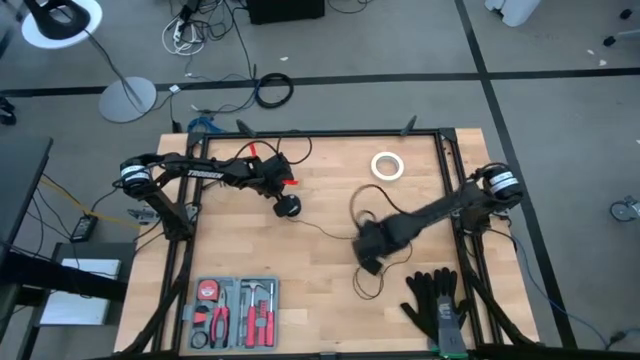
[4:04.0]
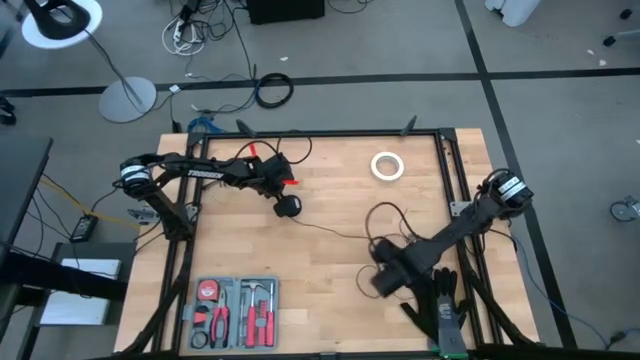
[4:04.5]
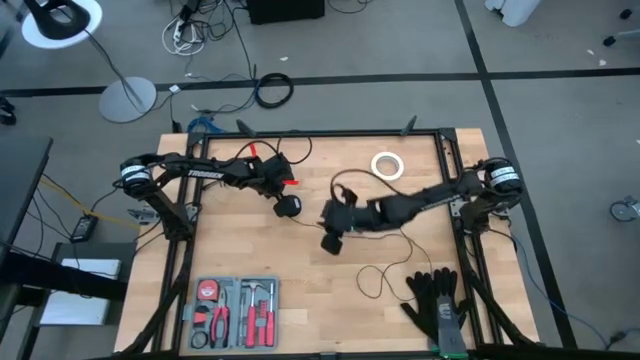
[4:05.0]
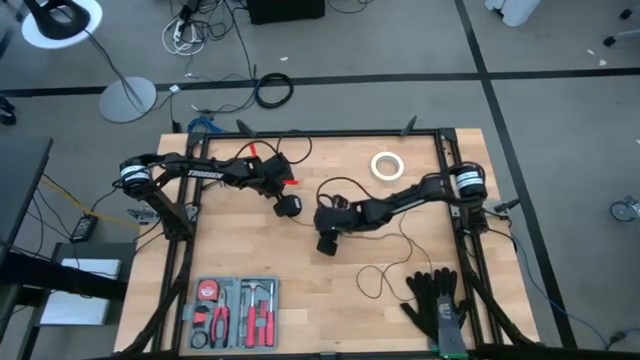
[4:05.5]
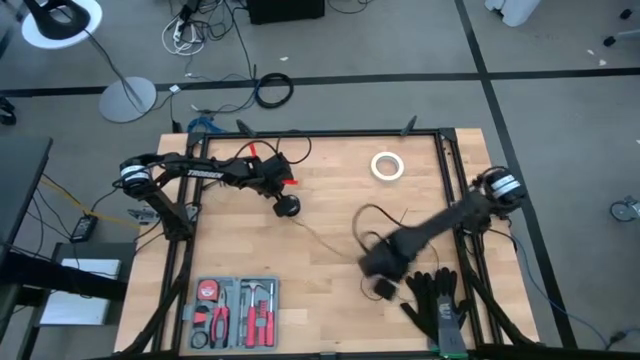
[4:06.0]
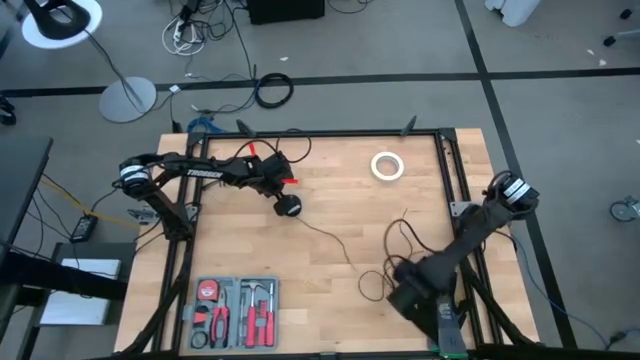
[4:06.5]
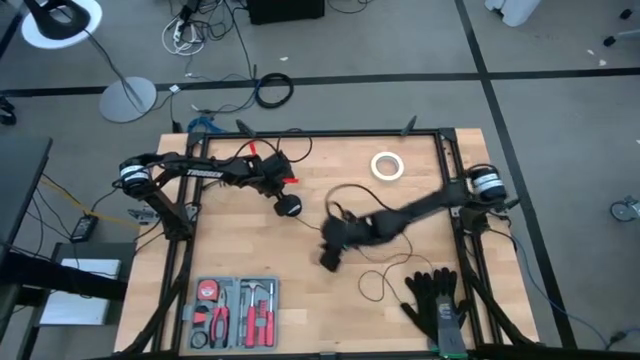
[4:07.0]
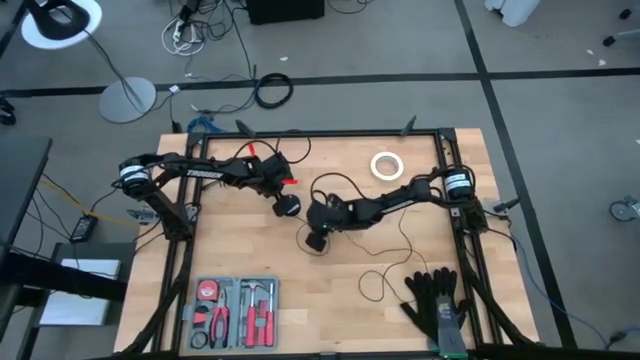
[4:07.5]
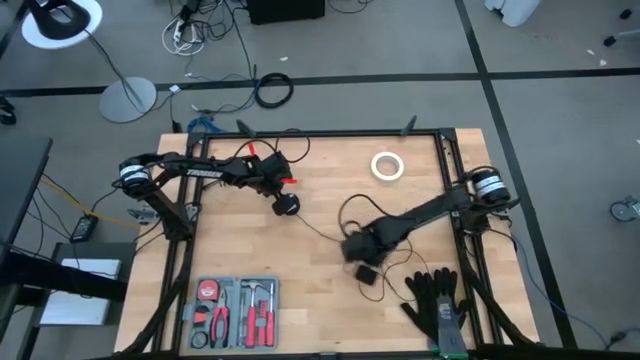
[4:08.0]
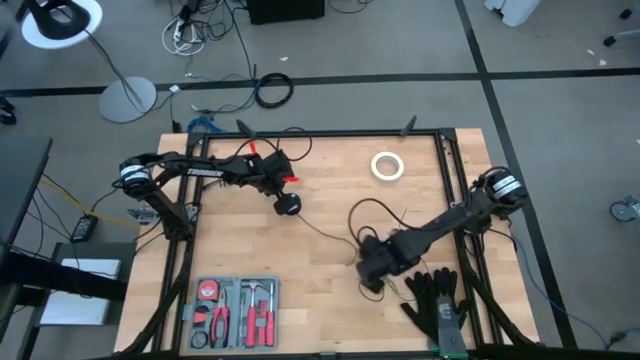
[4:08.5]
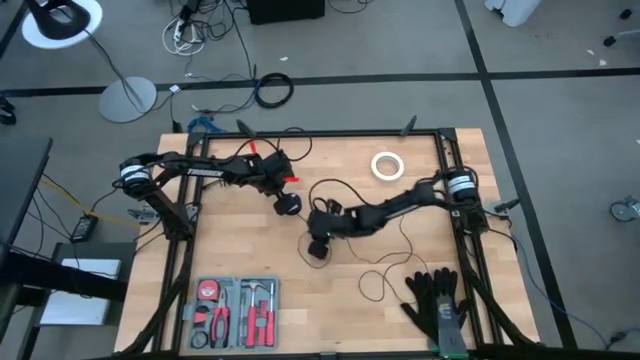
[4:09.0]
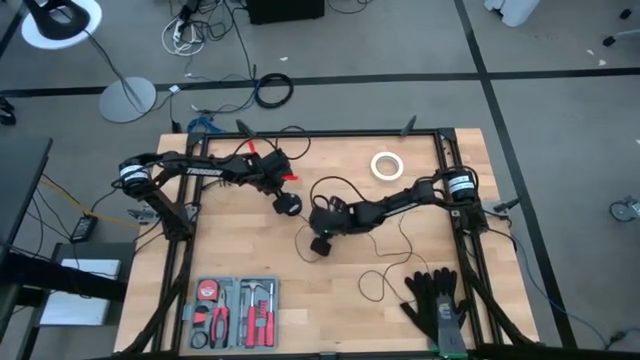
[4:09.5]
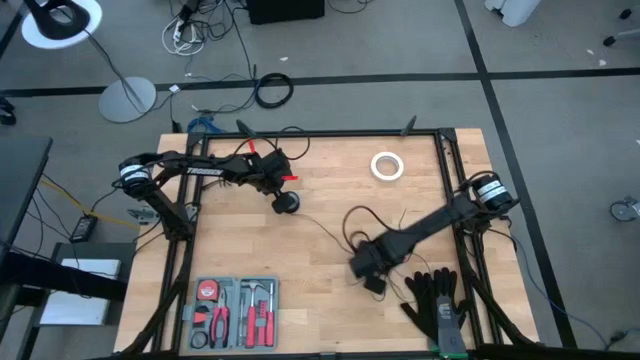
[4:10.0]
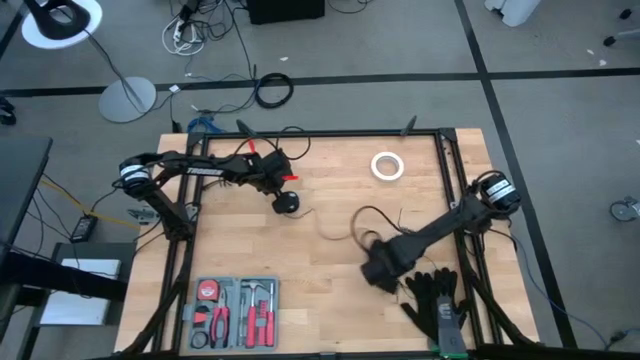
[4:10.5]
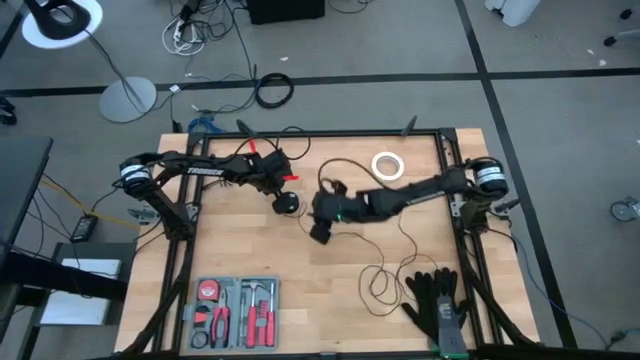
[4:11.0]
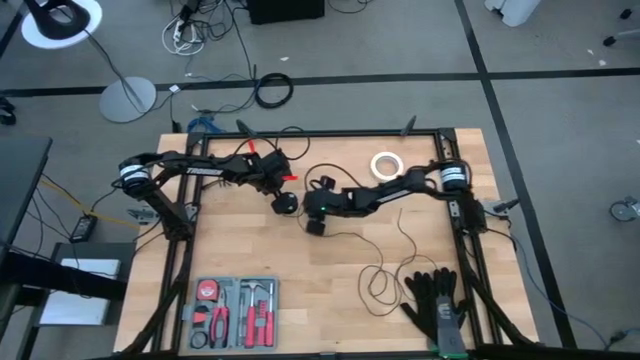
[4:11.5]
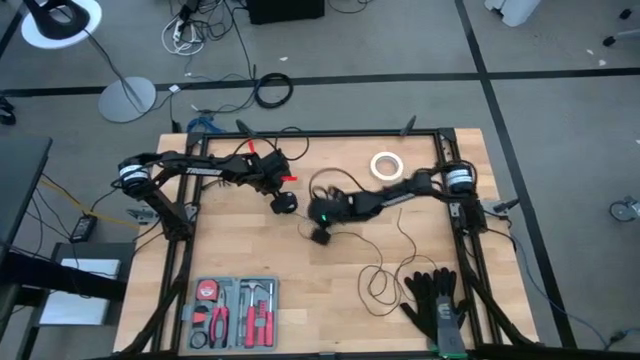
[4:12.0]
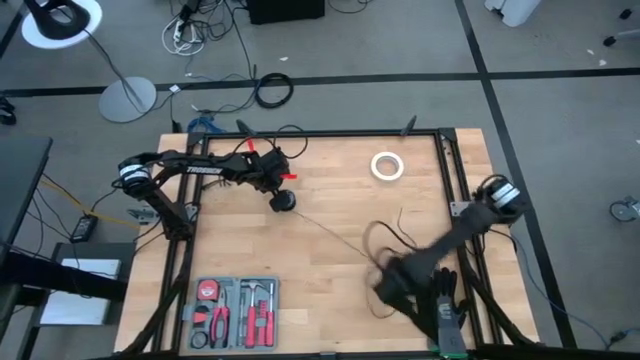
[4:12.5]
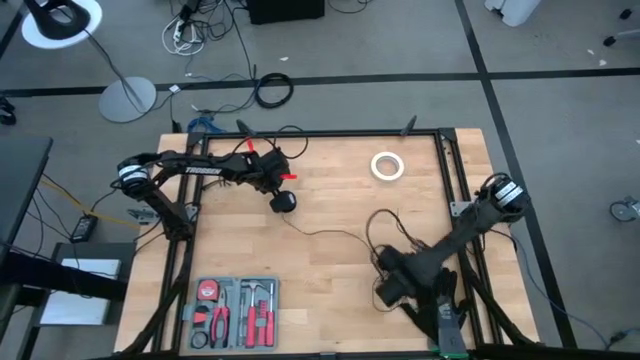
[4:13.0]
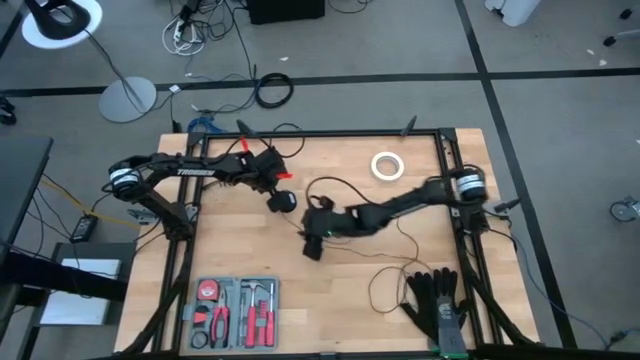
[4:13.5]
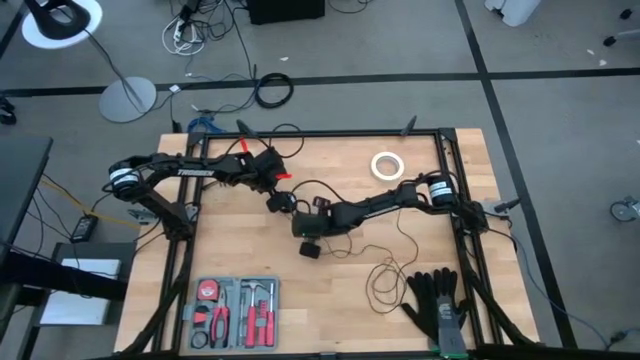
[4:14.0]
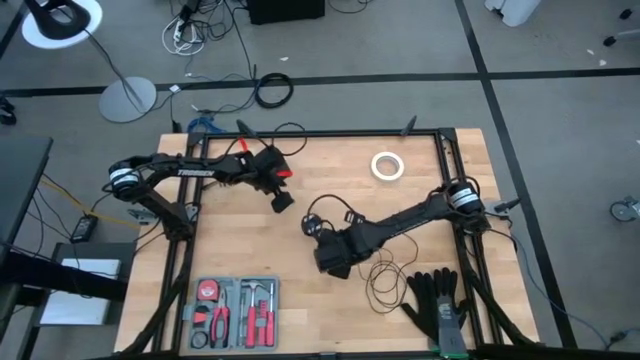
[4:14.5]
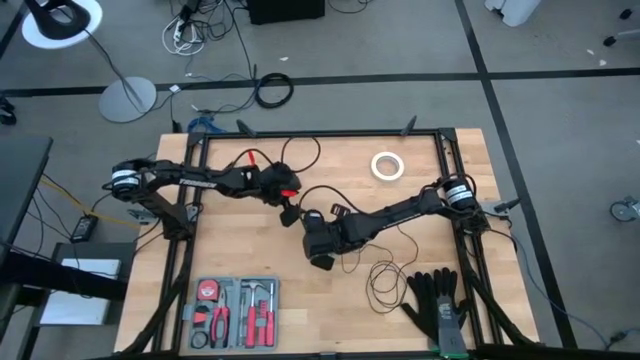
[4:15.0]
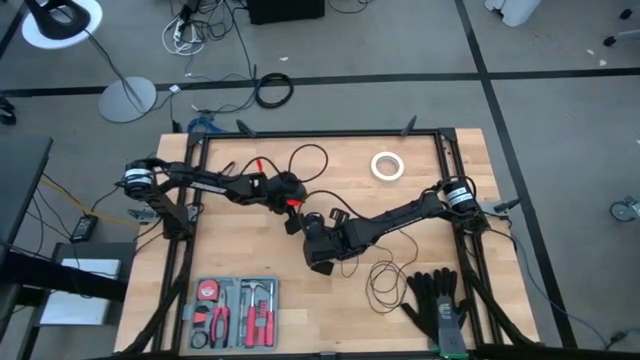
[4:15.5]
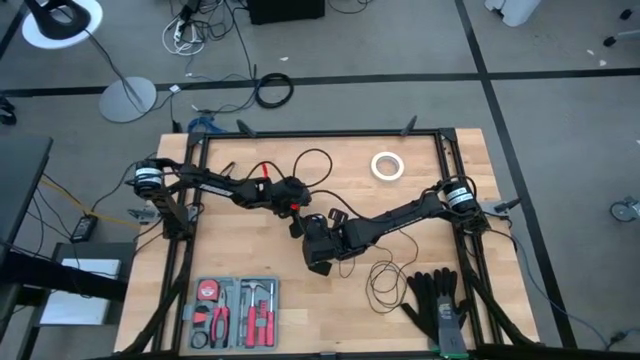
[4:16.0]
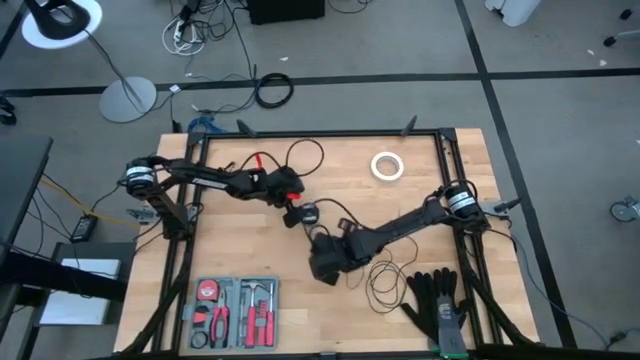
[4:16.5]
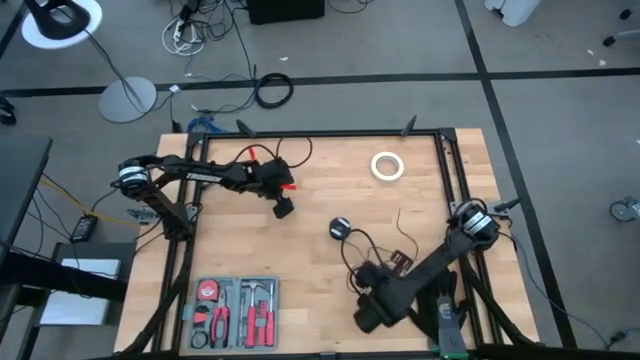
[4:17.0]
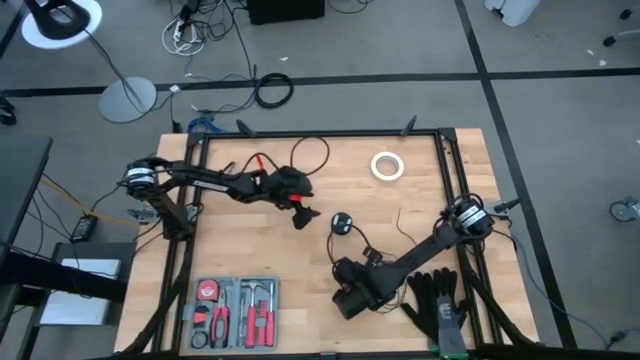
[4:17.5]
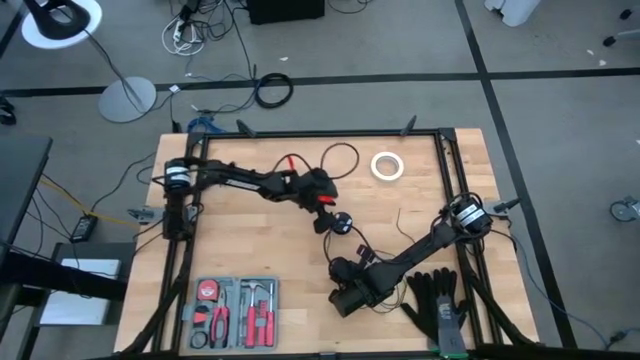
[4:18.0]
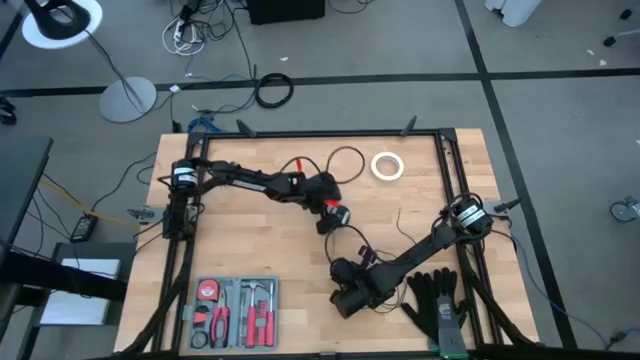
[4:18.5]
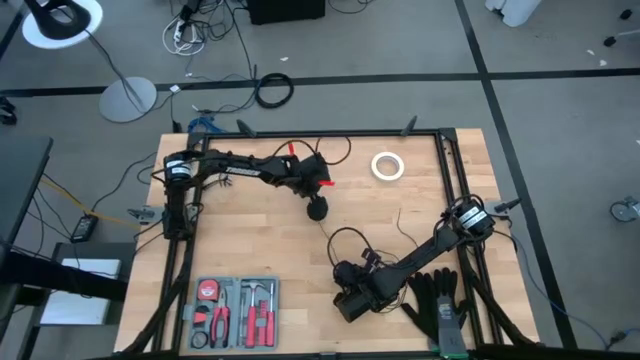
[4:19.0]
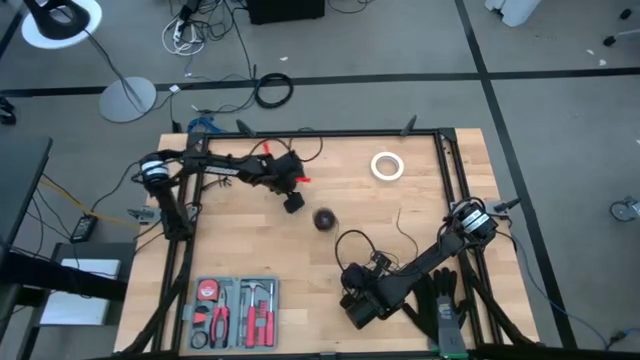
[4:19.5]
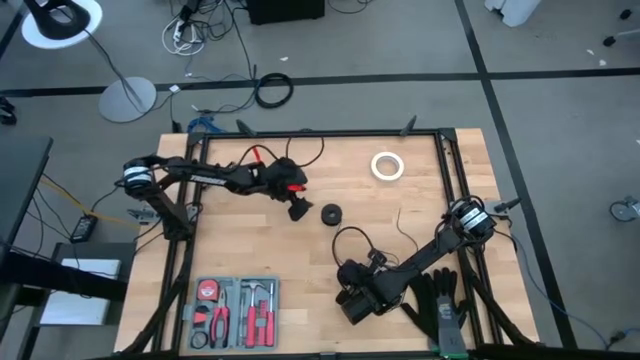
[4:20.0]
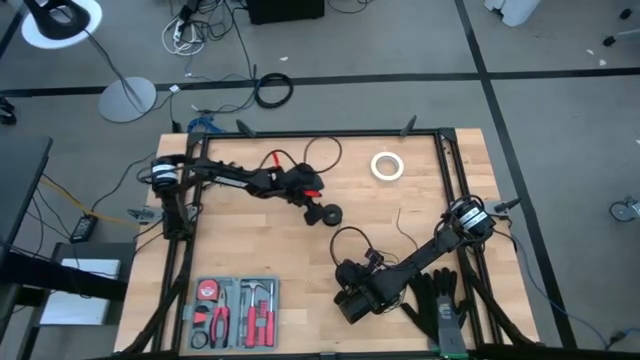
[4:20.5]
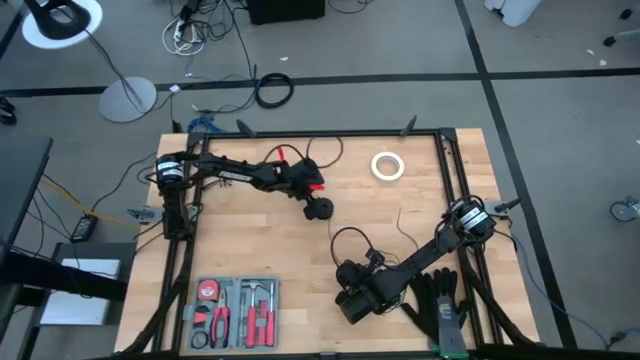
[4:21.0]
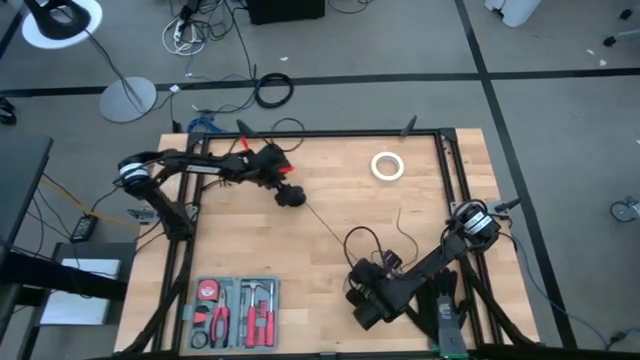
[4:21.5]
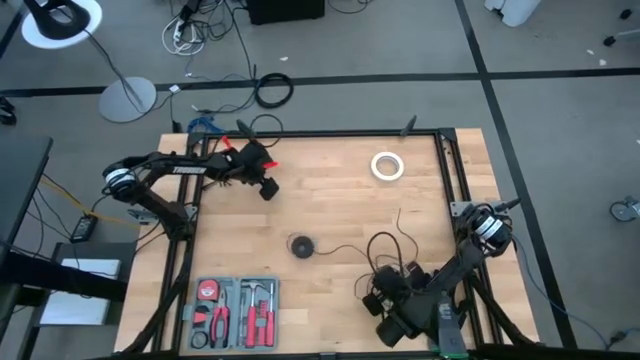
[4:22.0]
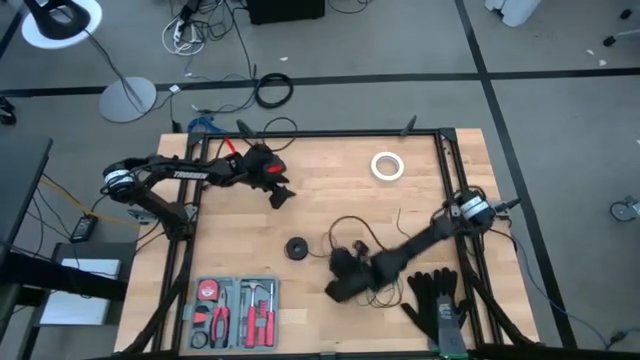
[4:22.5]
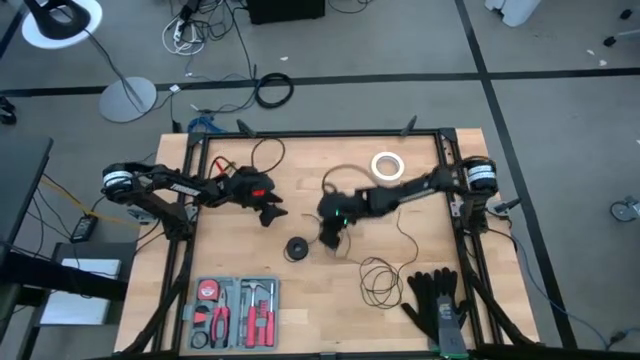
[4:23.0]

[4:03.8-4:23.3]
Task: Coil cords
Uncoil the black wire from the black spool

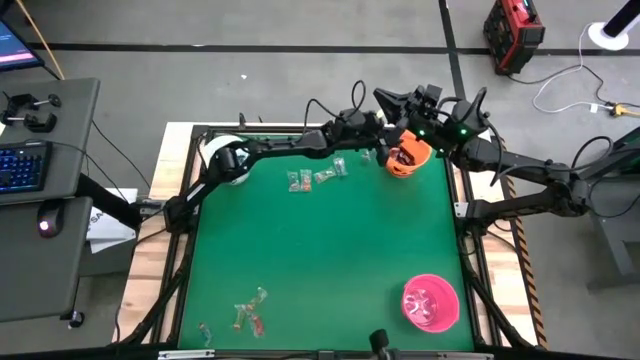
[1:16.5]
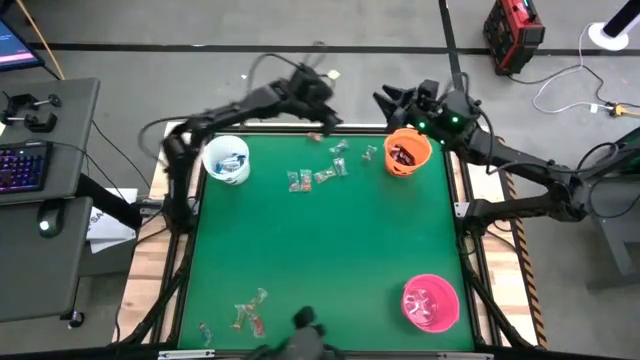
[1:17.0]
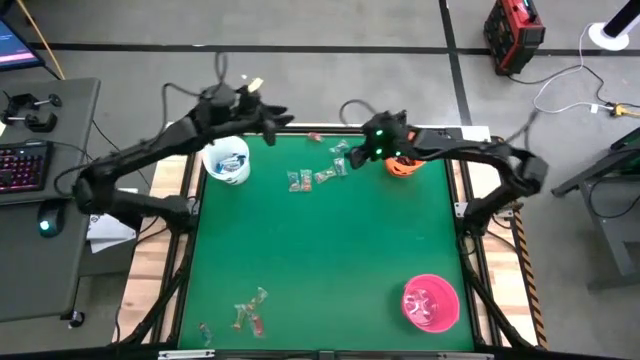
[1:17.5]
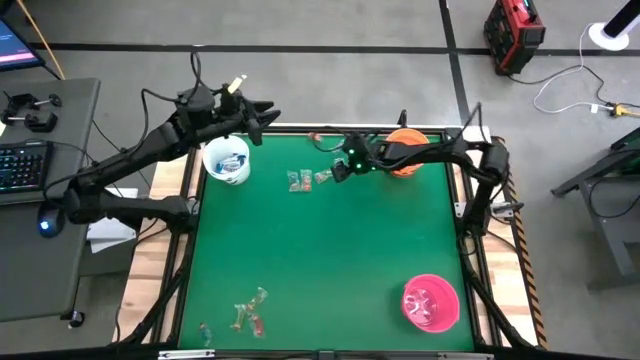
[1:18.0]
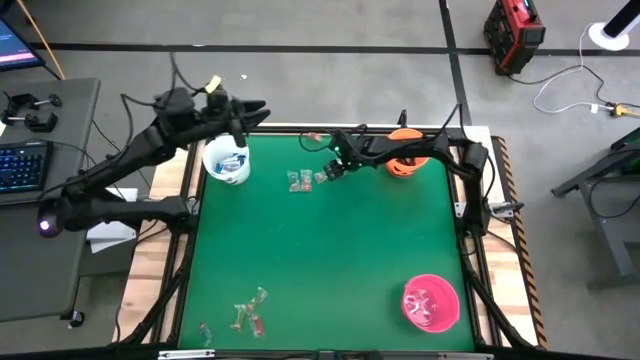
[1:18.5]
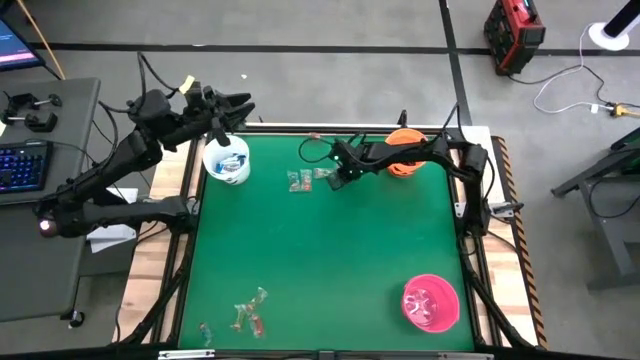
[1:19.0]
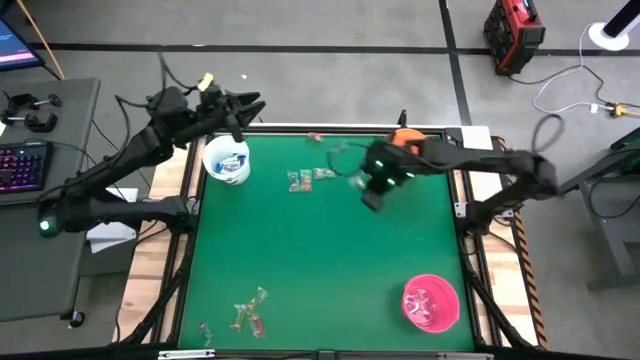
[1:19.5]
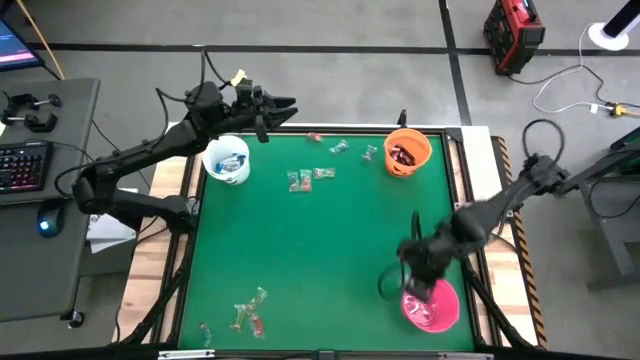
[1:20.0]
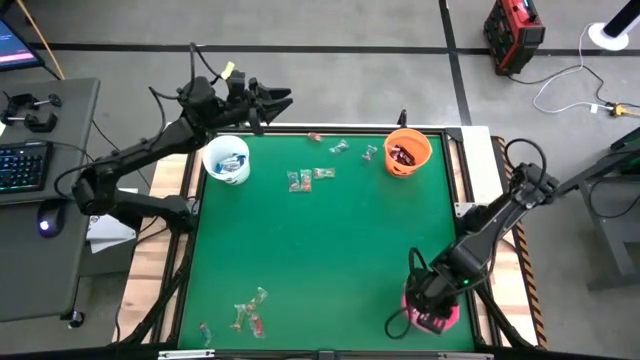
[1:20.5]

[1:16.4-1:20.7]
Task: Sort candy by brand, put in halloween buckets
Put the blue gummy into the pink bucket
